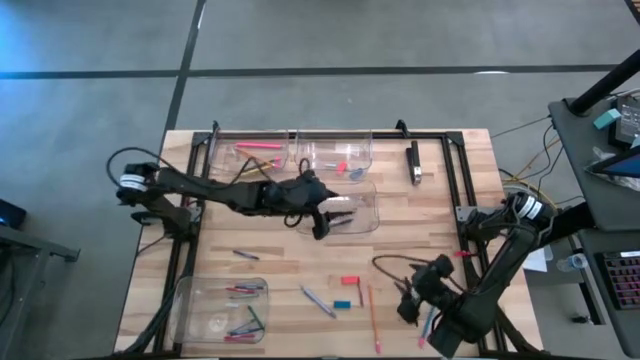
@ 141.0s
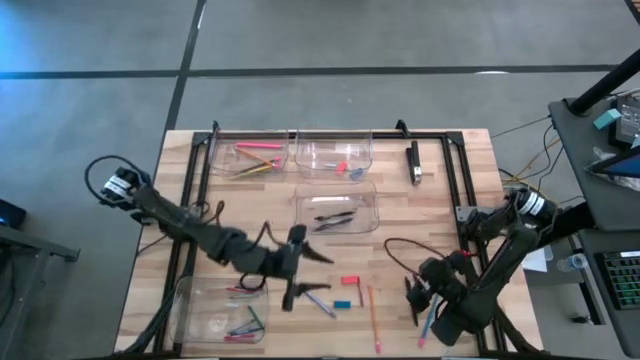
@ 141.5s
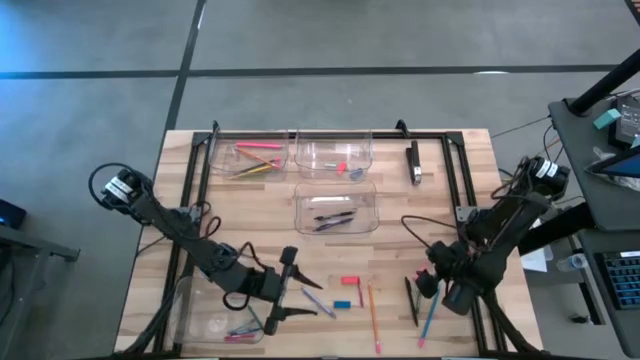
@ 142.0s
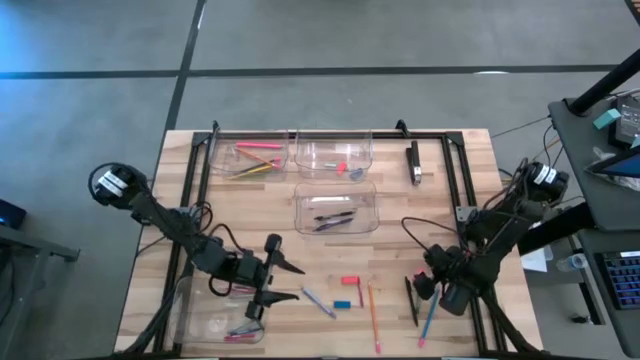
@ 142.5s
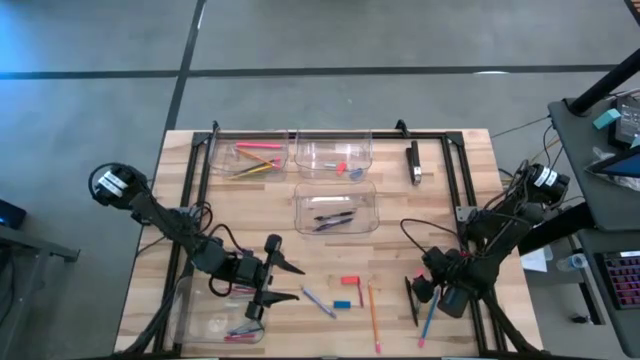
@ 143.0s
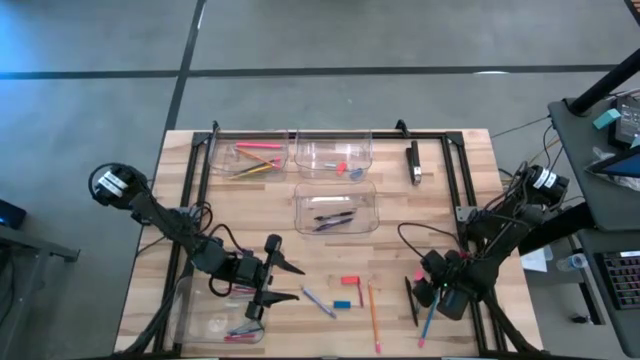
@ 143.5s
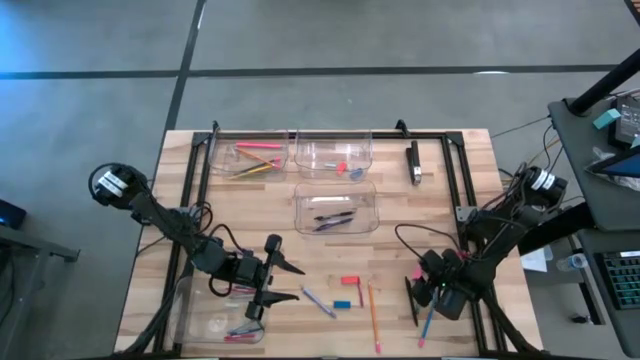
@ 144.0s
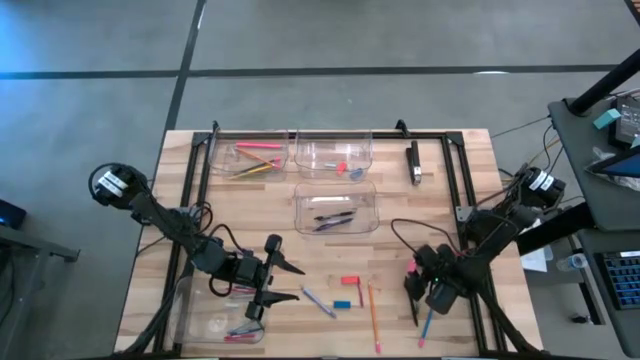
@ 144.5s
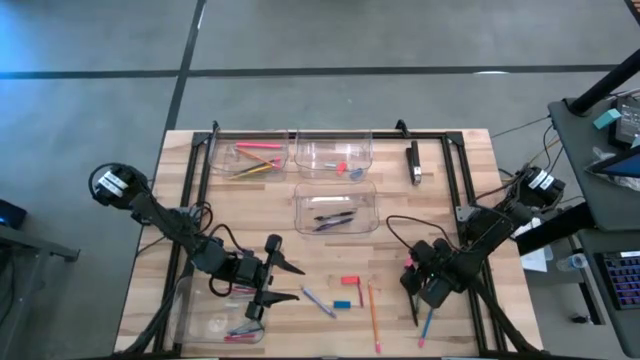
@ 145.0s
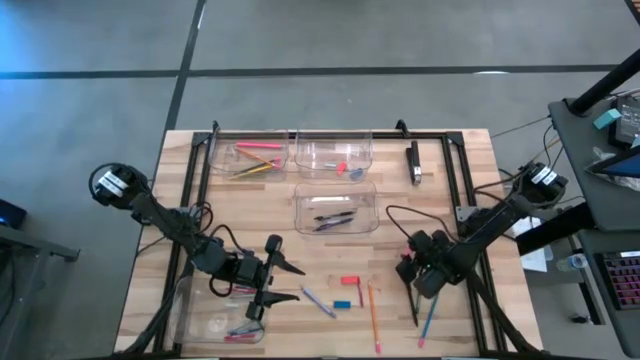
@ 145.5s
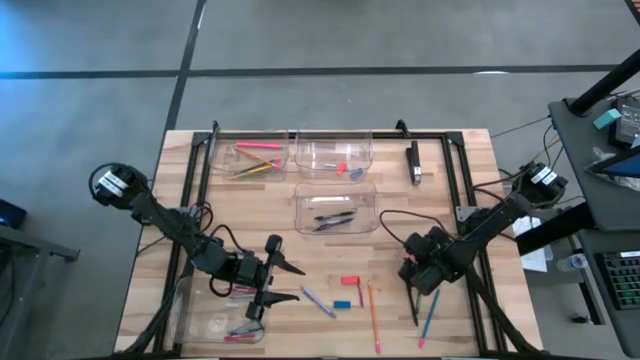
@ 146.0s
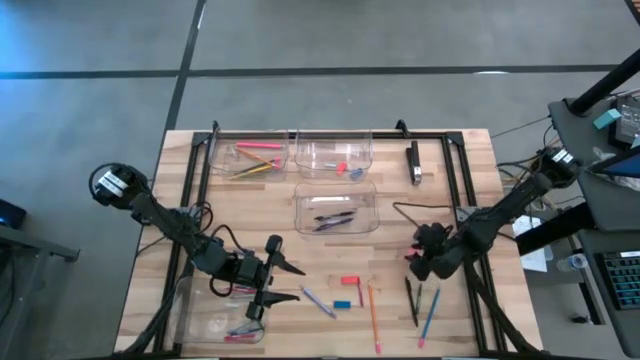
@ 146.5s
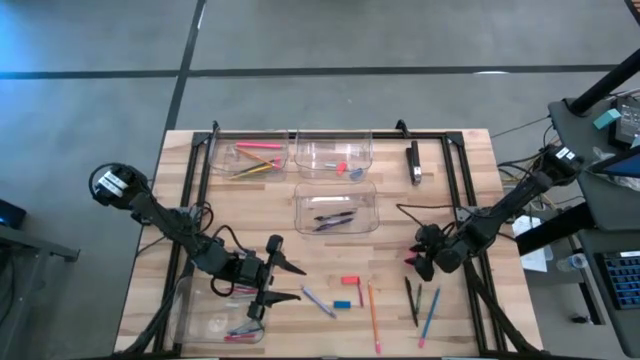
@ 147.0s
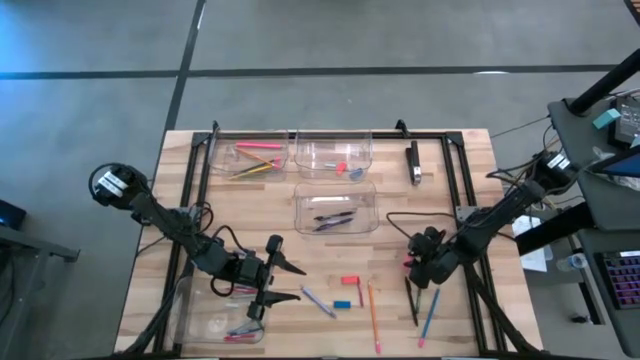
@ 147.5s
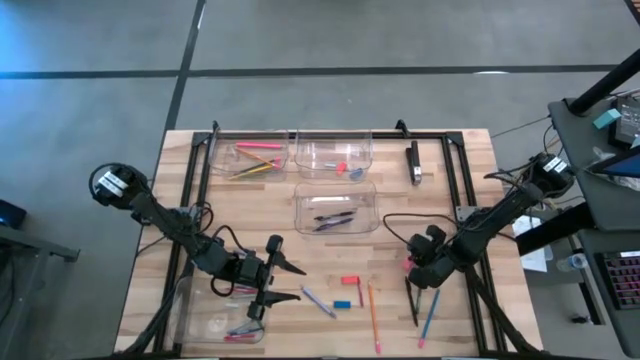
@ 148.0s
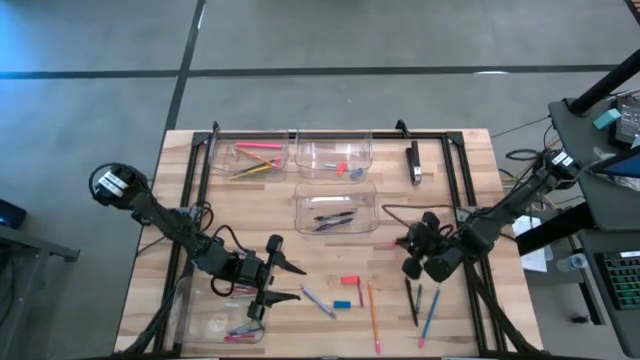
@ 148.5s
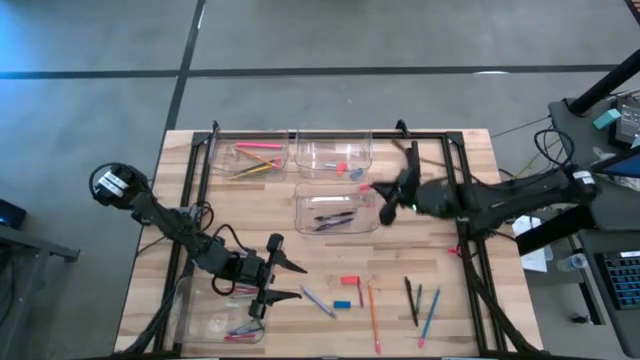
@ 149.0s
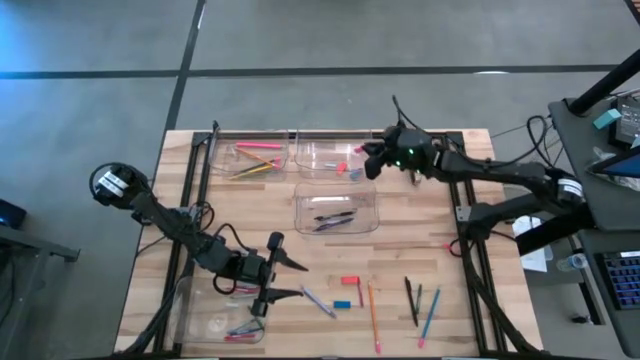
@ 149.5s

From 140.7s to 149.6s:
Task: Sort crayons/erasers/pens/pencils in bins
Put the pink eraser into the top right transparent bin

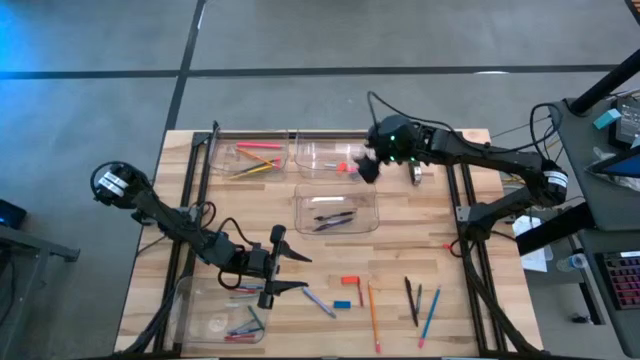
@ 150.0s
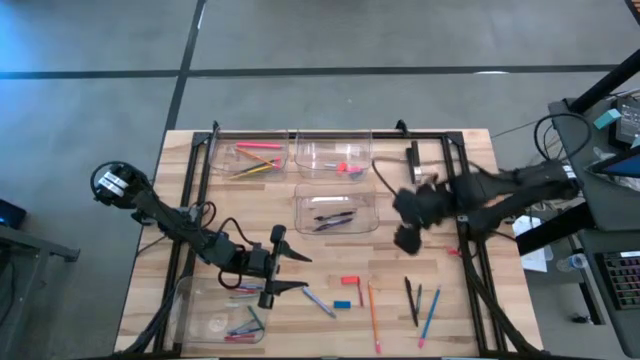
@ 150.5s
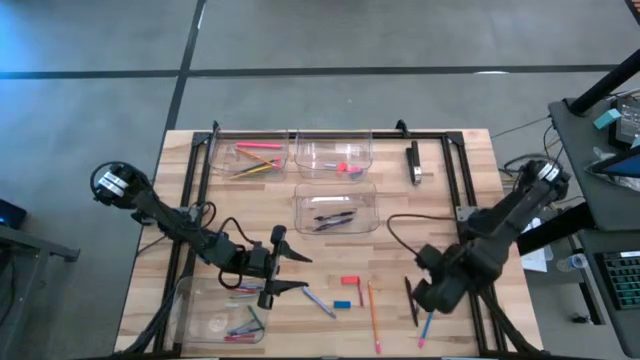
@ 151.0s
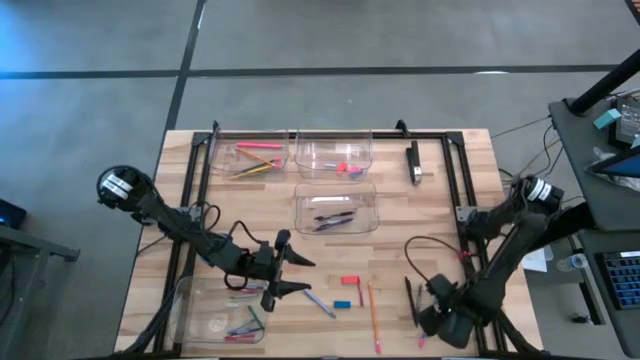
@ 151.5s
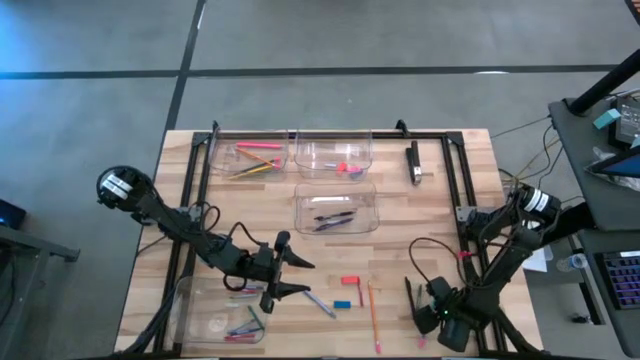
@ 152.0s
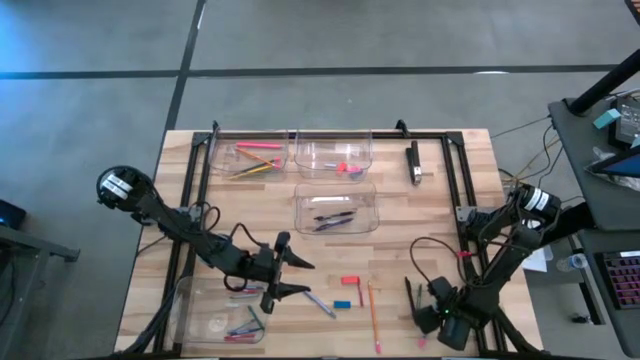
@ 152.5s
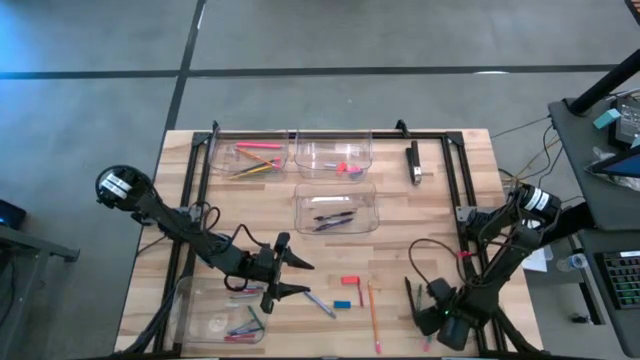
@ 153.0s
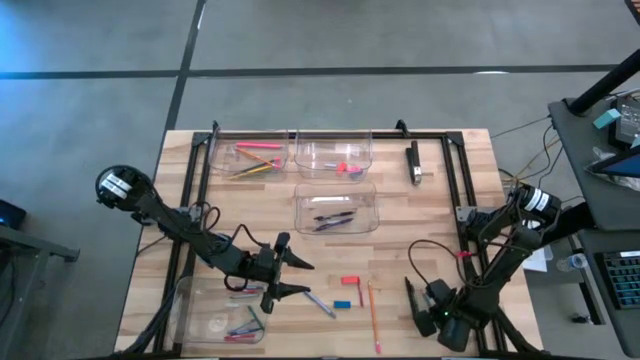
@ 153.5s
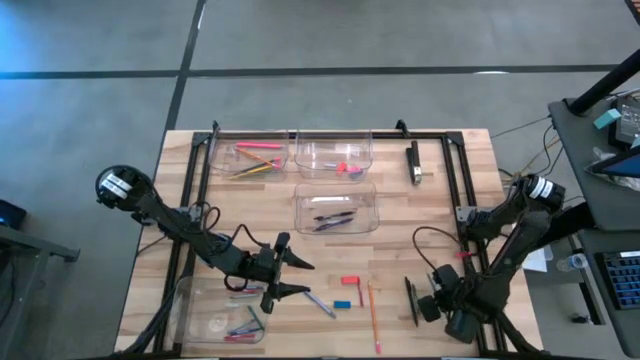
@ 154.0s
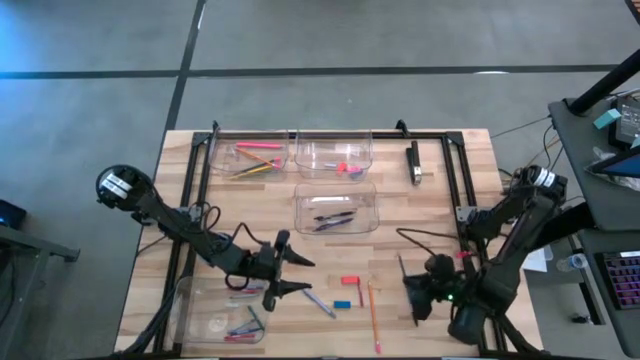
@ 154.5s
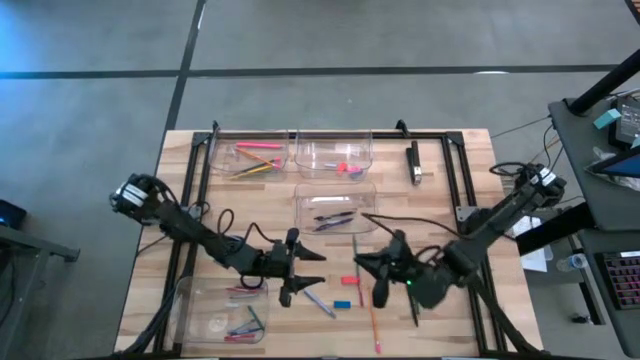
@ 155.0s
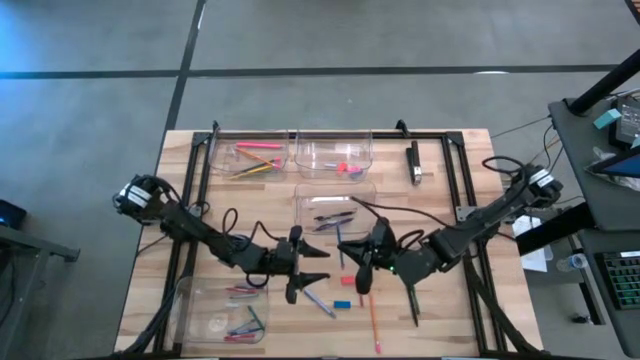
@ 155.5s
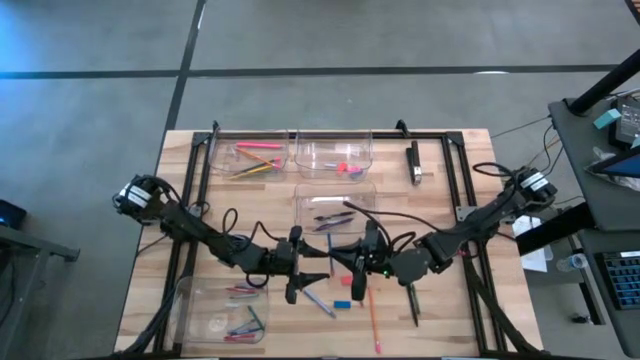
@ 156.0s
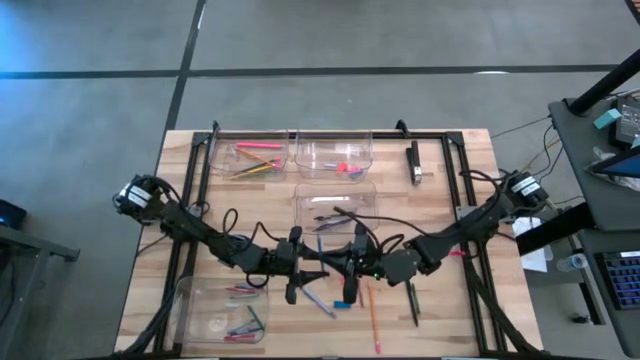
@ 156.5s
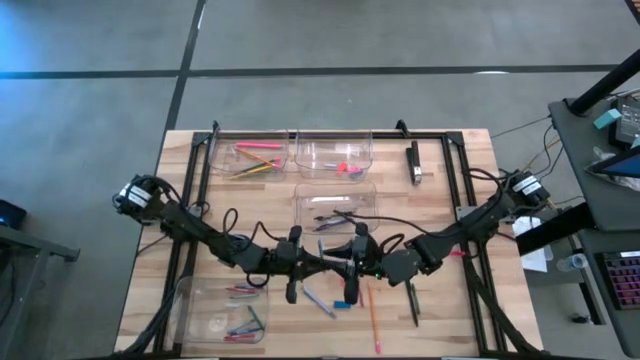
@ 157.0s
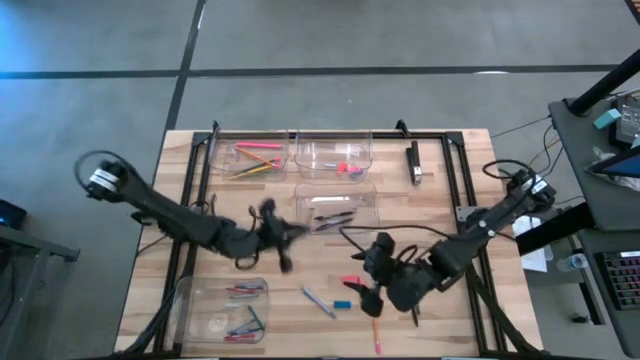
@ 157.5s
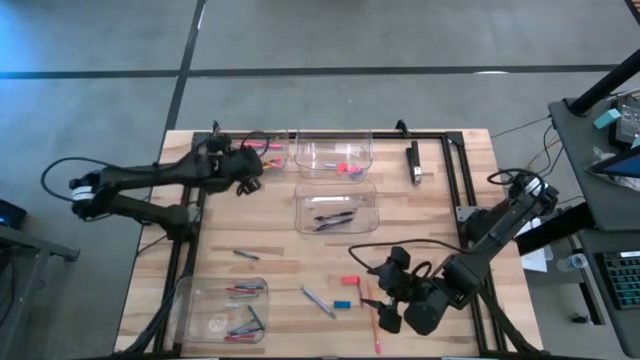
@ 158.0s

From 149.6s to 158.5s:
Put the blue pencil into the top left transparent bin

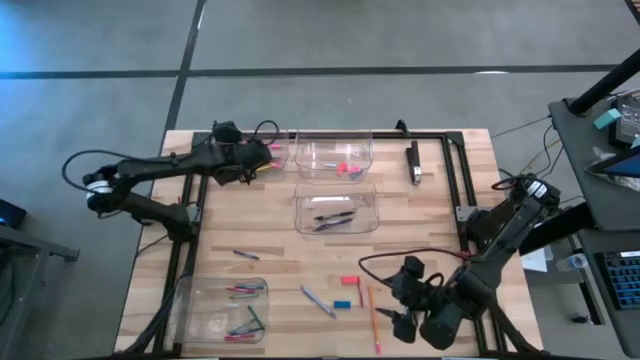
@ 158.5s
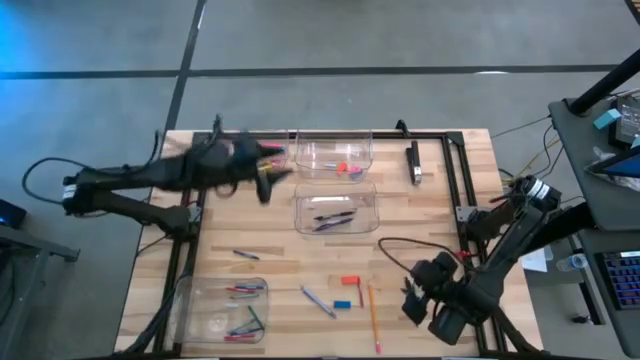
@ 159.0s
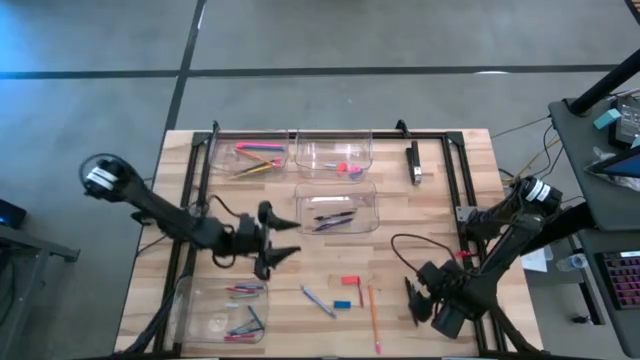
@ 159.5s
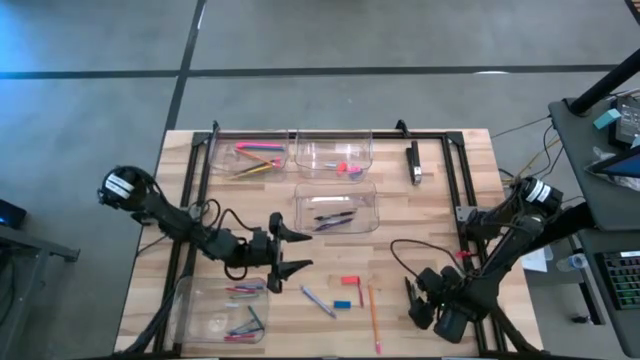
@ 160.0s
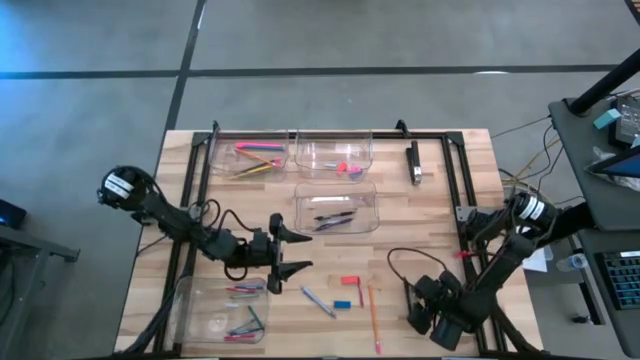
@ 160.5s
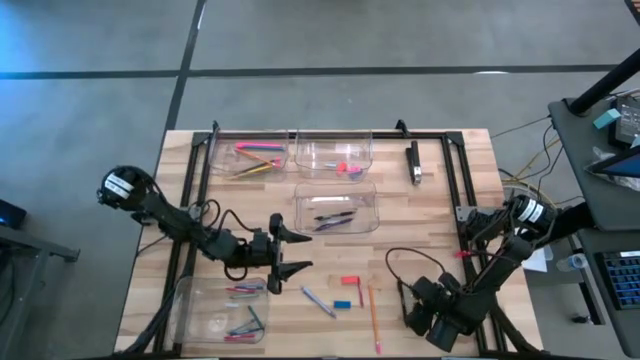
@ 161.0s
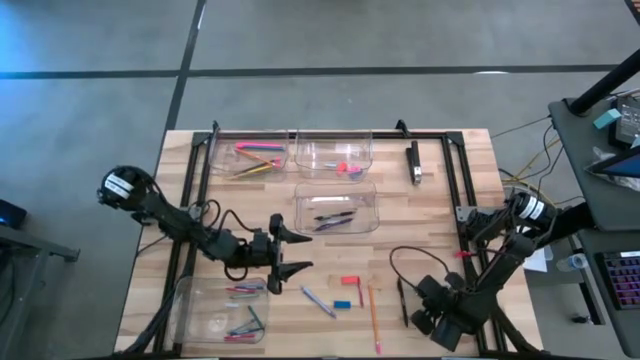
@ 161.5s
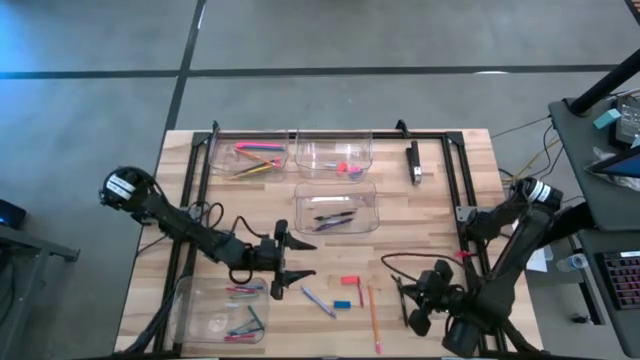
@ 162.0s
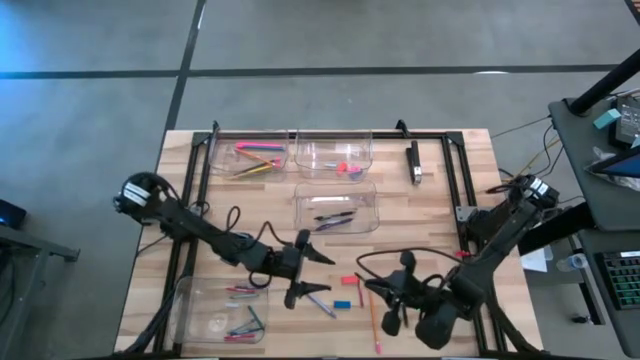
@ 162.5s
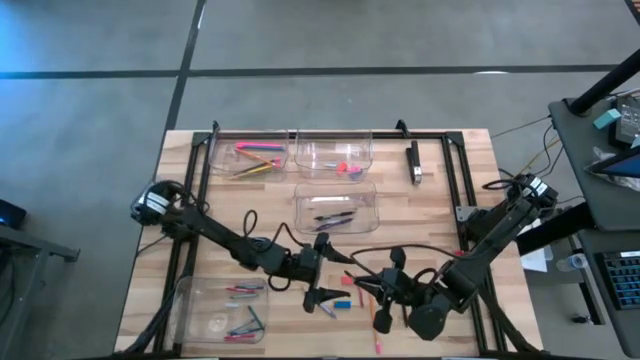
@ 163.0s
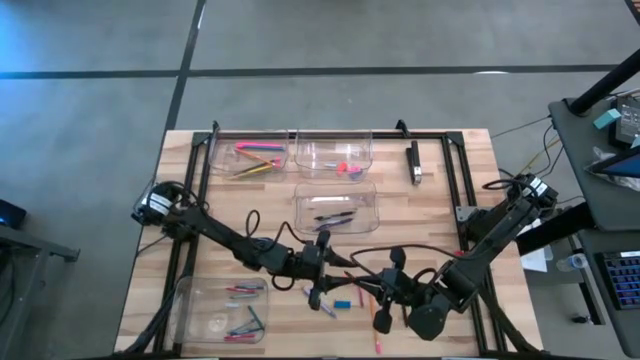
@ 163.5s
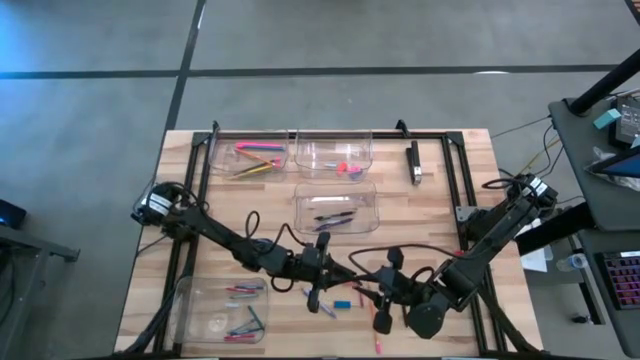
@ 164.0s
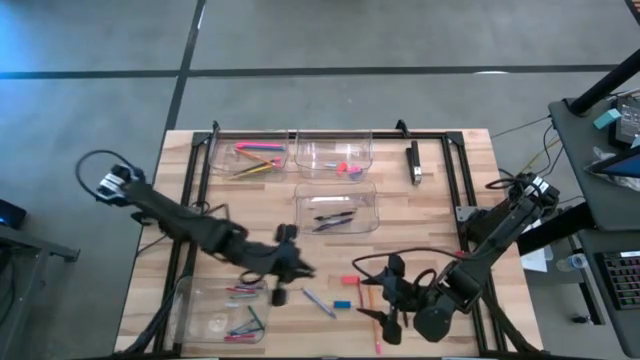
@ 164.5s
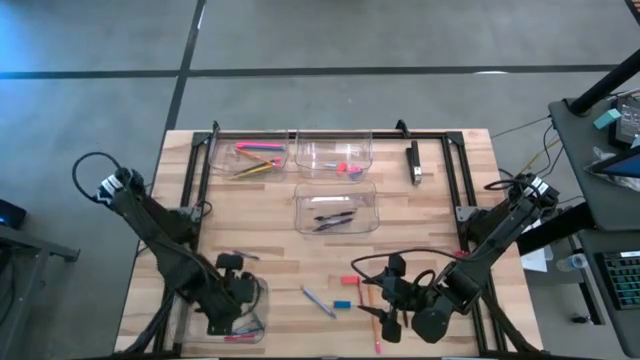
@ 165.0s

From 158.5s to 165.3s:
Put the green crayon into the bottom transparent bin
